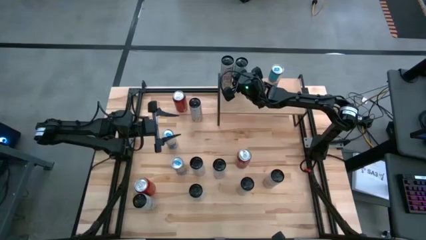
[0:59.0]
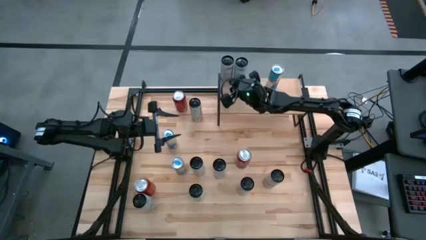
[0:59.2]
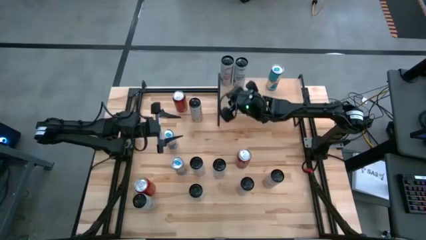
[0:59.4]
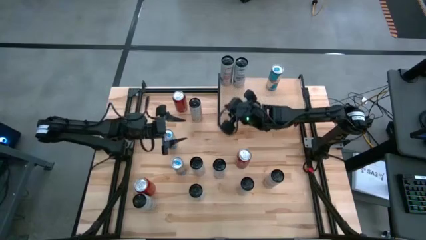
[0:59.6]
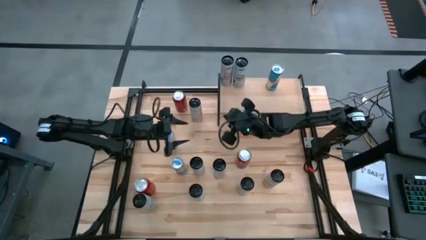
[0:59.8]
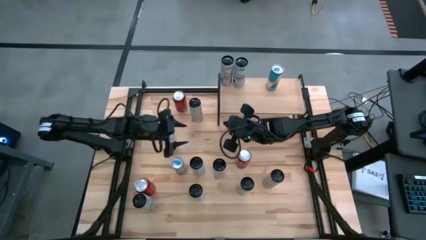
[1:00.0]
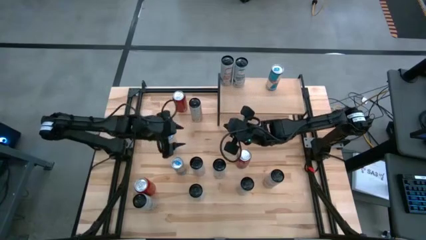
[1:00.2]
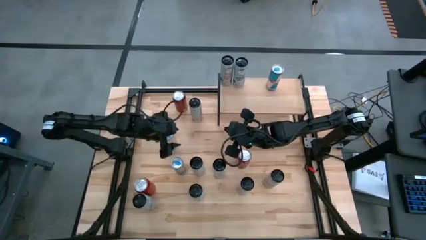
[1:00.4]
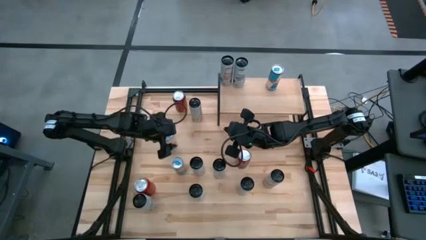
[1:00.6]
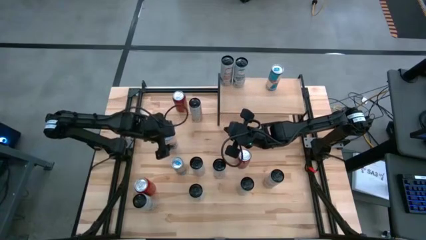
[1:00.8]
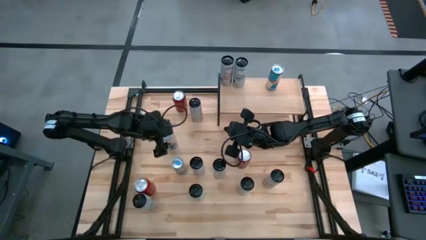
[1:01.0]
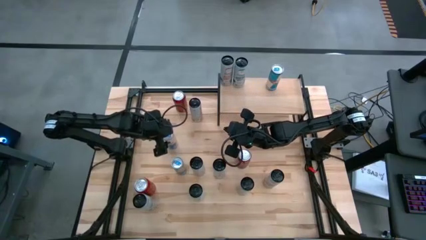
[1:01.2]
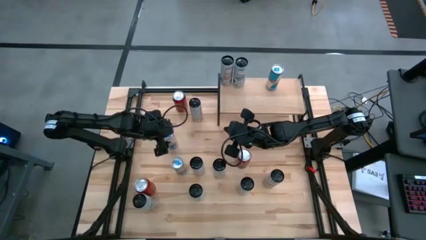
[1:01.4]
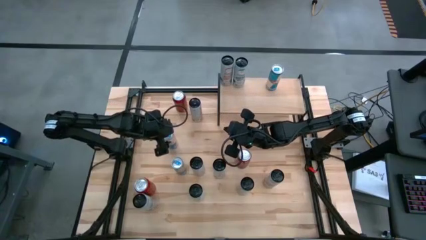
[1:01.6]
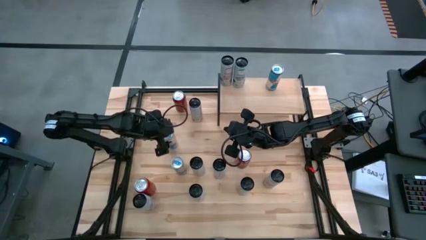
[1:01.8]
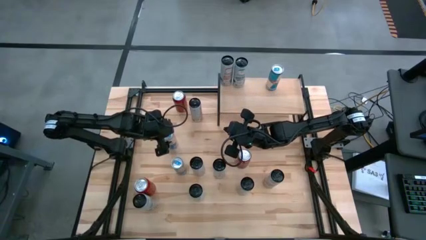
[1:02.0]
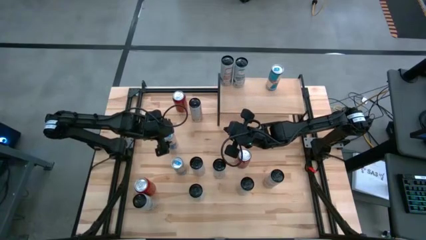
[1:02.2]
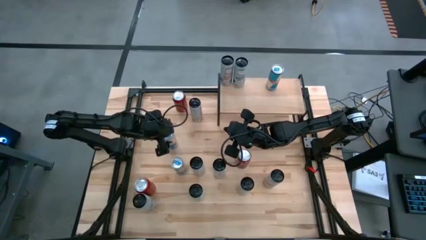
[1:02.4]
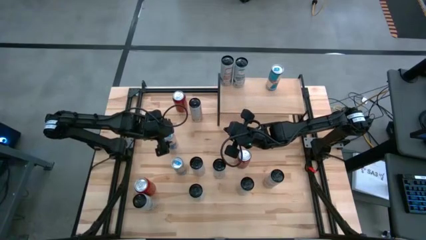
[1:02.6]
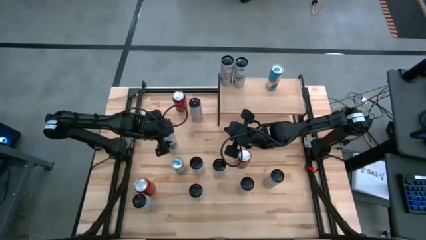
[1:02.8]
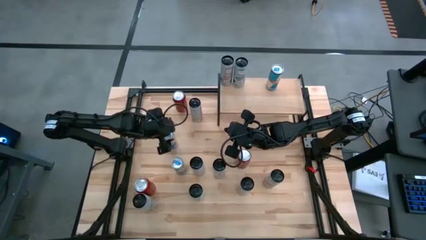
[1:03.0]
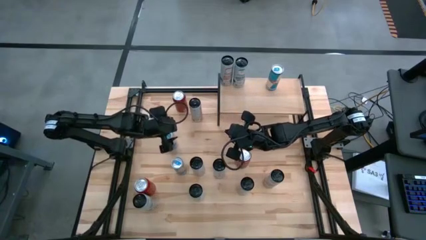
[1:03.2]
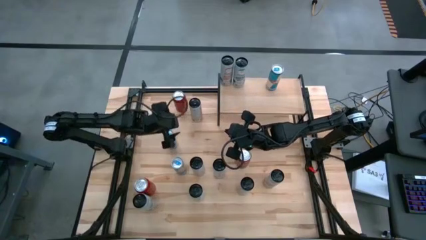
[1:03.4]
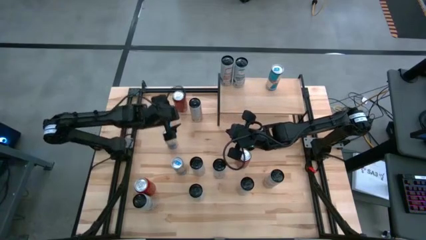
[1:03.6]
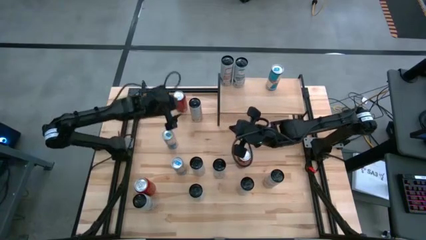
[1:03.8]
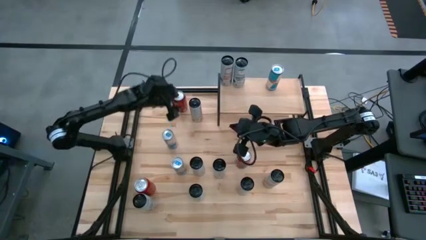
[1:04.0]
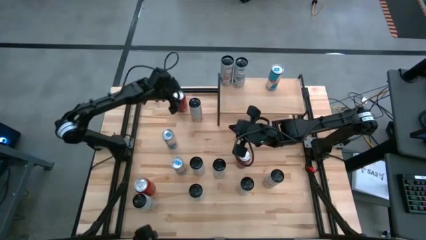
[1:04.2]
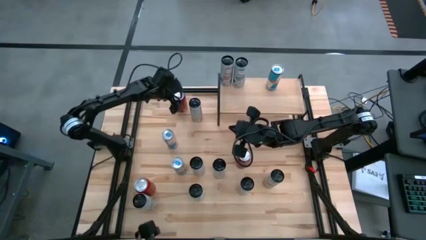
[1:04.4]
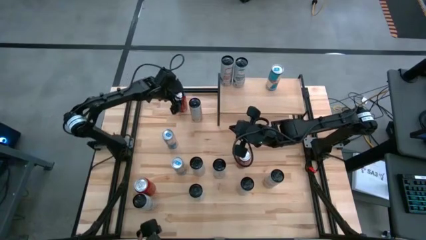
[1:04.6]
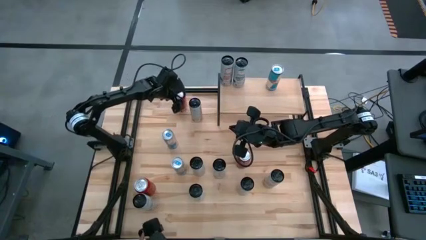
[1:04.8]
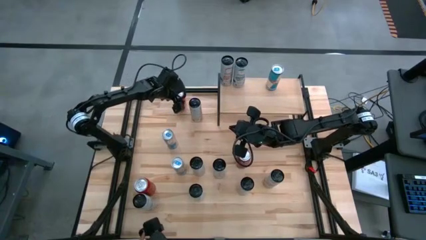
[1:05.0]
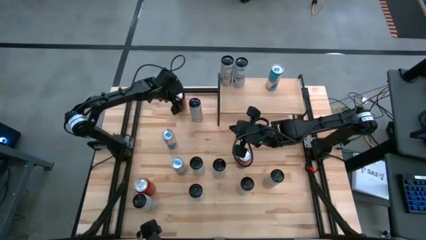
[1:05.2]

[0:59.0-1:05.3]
Task: Place canned beverage on shelf
Put the top red black soda can on the shelf

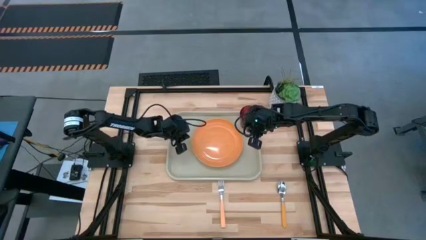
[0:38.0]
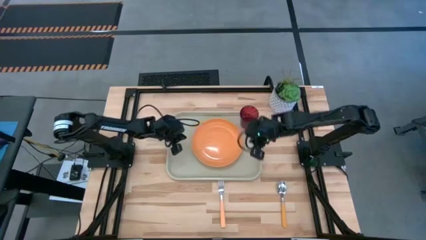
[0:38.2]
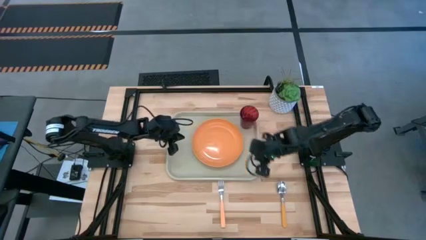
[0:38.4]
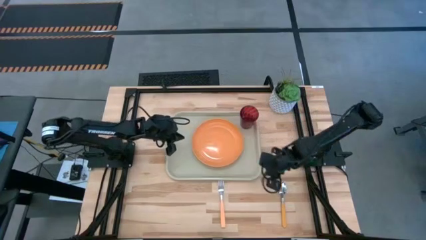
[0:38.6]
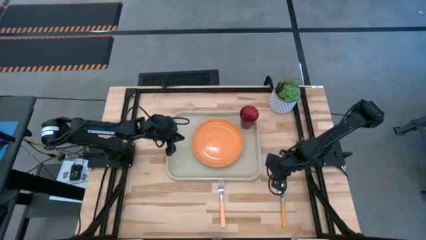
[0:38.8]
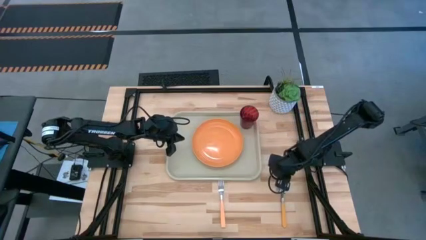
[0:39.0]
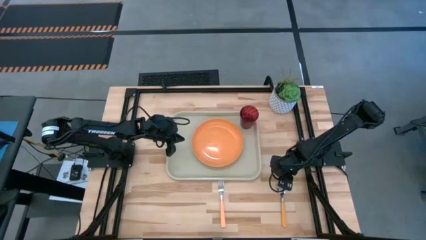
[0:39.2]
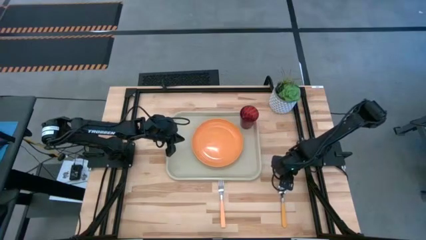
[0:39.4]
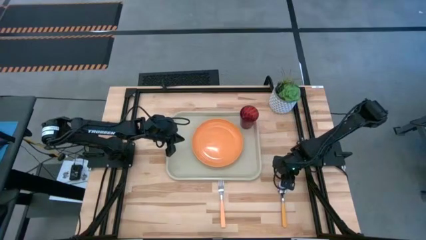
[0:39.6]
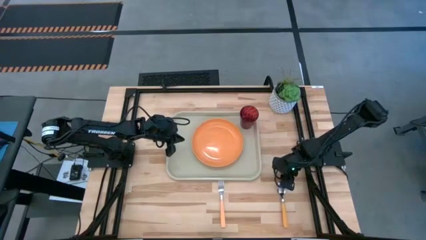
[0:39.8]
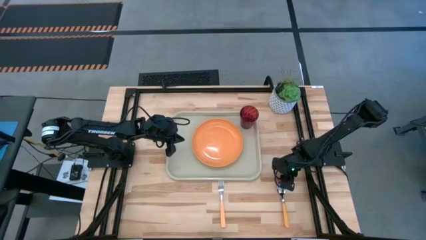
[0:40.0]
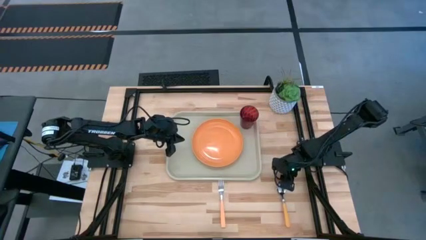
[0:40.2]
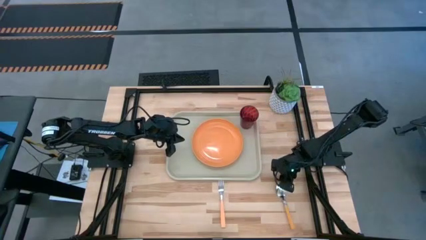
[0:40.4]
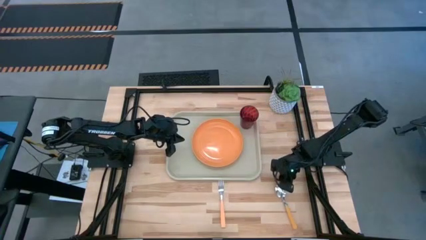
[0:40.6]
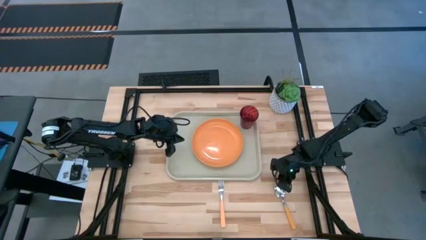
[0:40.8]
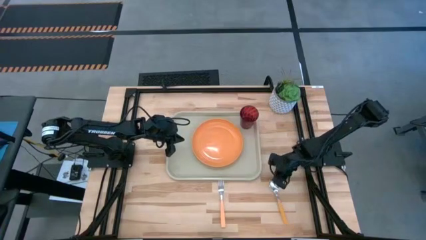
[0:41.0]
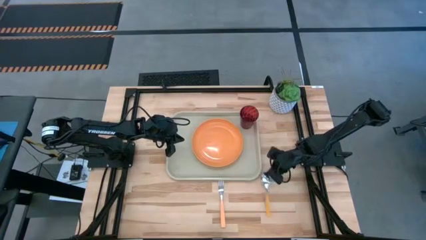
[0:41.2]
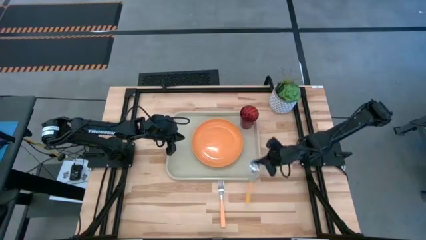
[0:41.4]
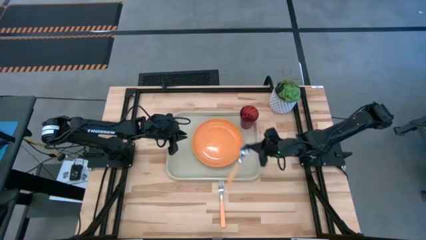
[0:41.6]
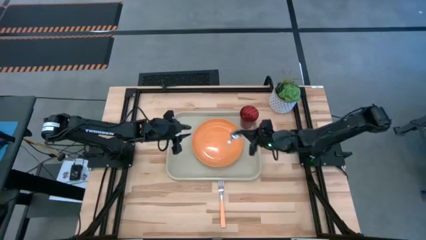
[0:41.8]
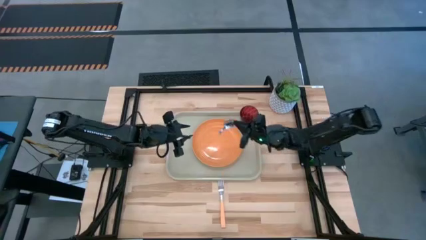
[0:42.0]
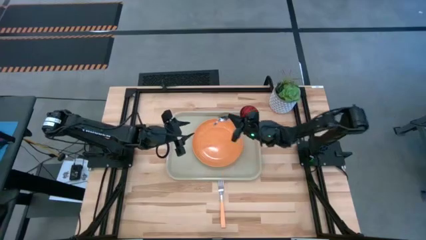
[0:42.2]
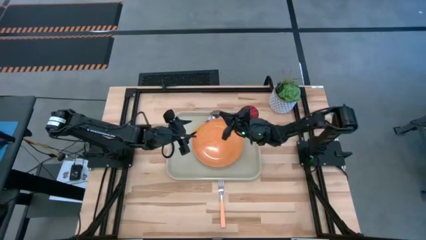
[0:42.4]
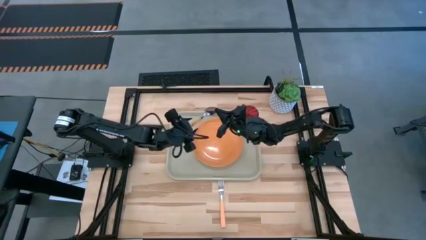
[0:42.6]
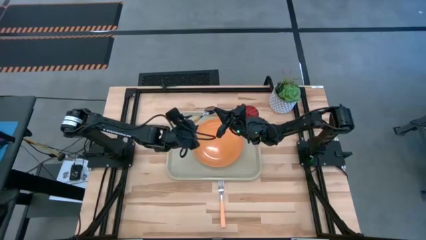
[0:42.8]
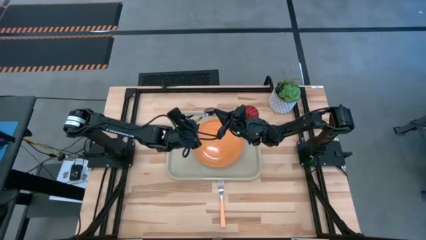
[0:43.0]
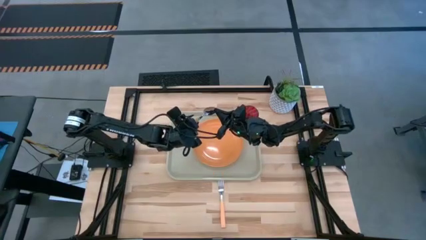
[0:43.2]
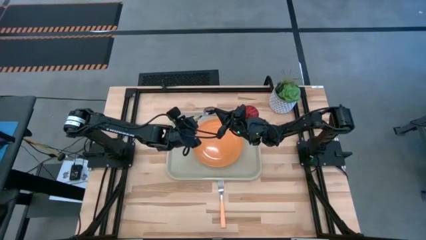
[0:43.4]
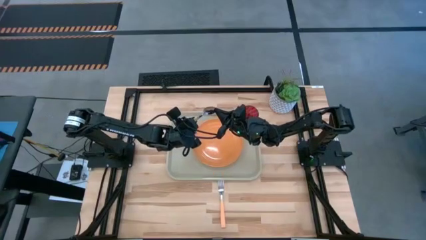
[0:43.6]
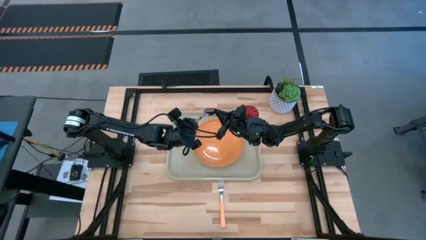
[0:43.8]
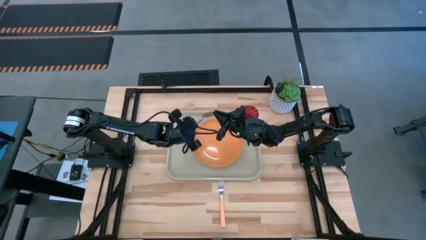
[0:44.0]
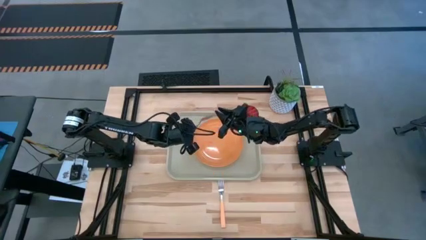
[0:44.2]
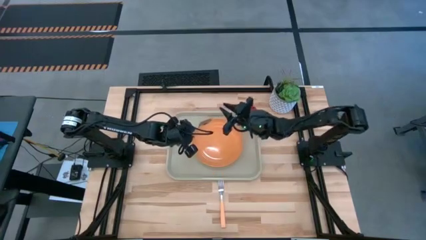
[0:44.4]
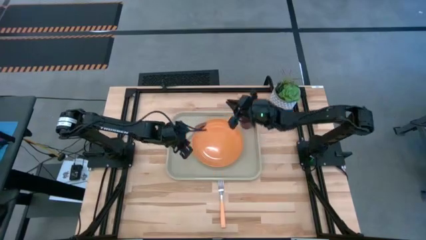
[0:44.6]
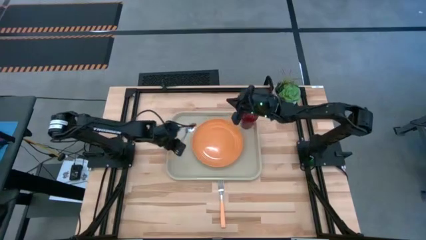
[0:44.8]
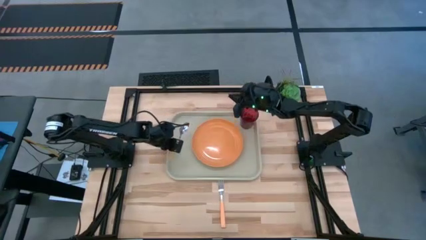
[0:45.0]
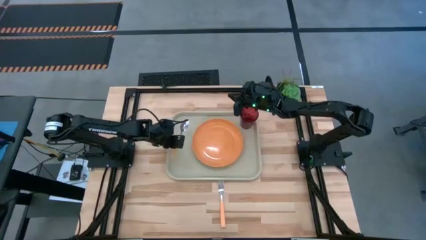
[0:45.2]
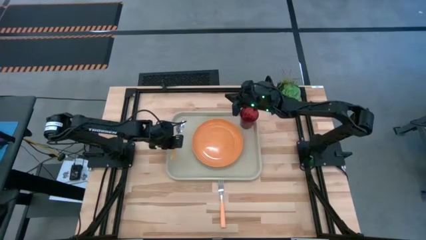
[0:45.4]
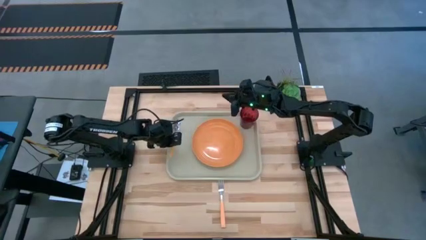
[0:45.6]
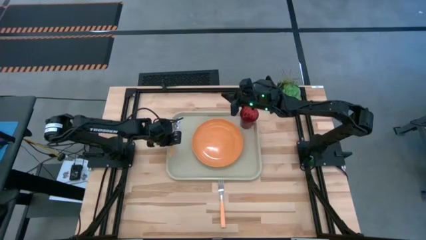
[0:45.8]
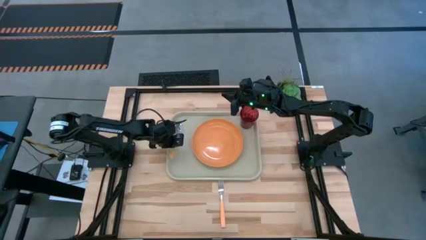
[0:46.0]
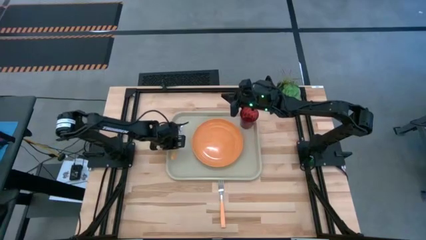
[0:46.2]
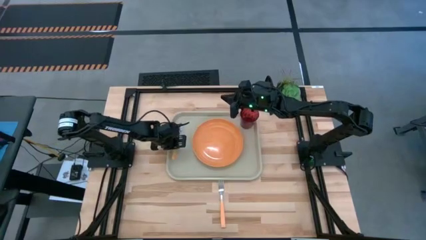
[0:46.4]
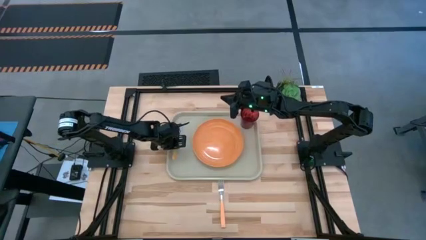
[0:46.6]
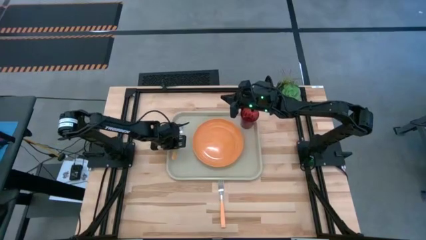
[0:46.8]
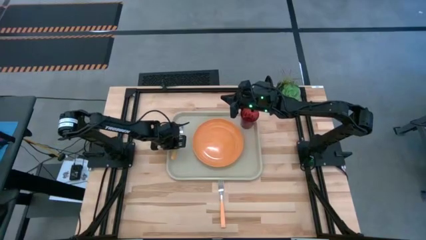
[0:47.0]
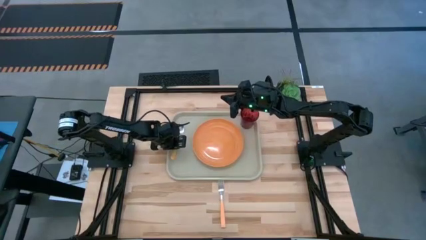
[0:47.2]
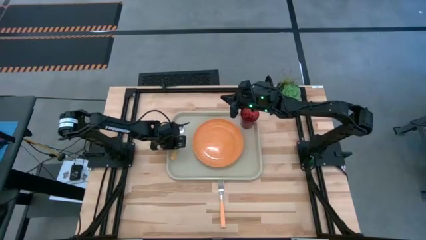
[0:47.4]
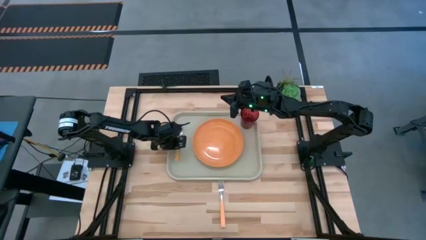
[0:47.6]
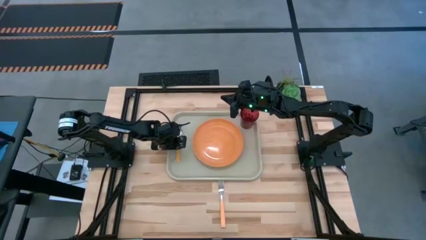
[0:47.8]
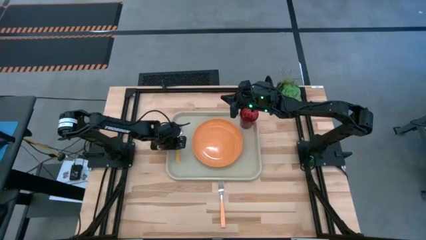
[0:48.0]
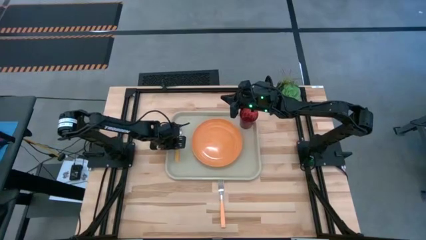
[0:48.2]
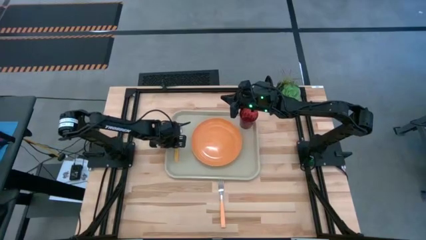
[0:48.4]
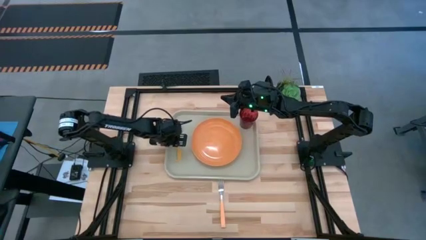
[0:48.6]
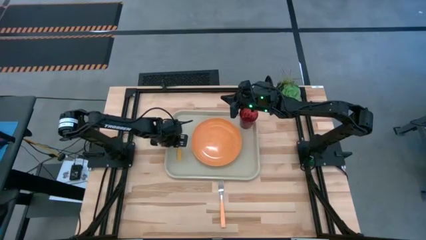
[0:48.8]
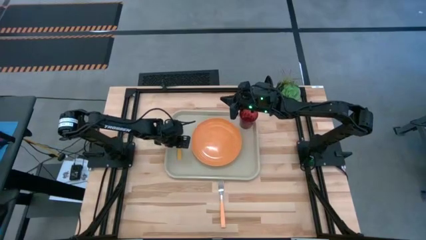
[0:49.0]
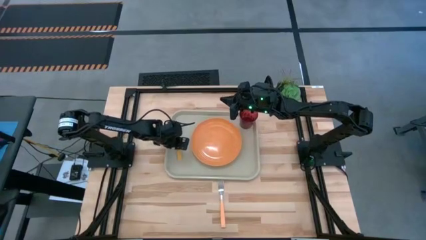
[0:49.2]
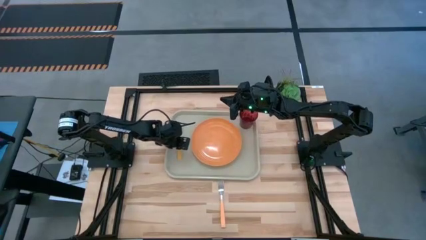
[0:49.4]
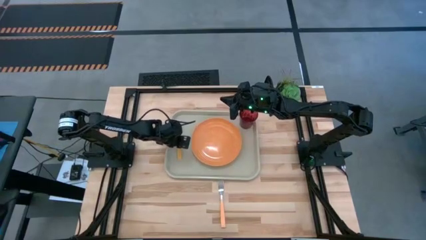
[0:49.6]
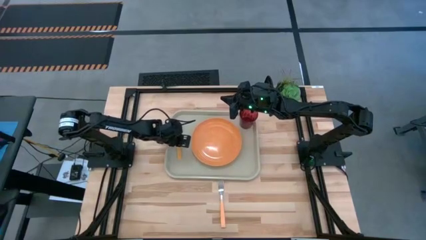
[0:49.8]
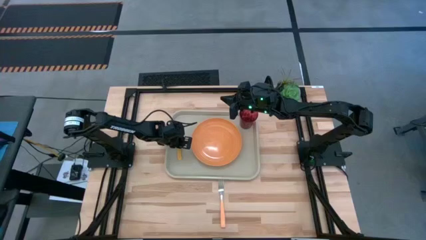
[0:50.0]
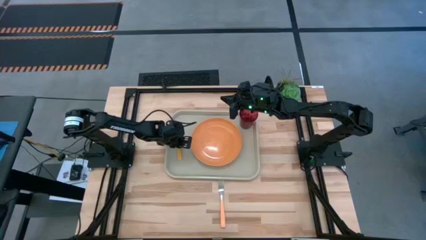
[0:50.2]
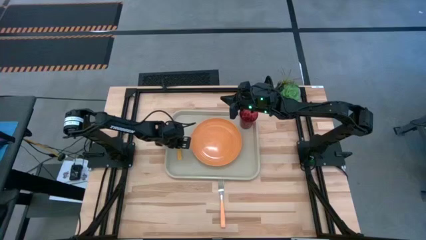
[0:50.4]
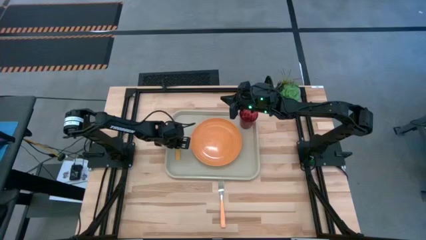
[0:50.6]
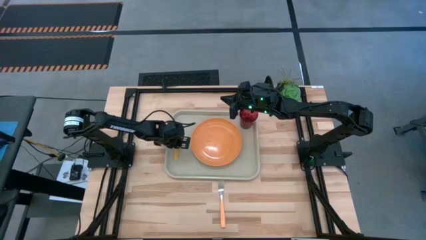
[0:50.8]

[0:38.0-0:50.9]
Task: Pick and place plate/cup/fork/spoon on tray
Put the orange spoon to the left of the orange plate on the gray serving tray
